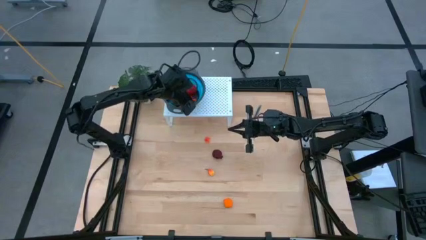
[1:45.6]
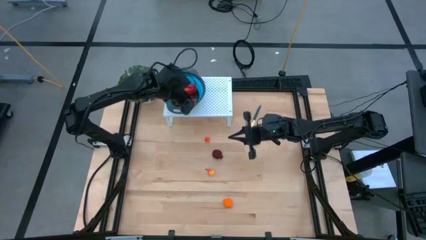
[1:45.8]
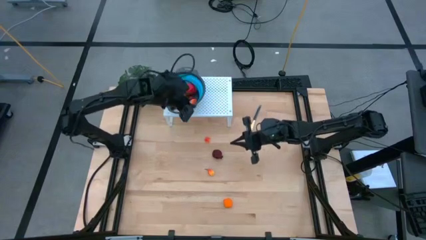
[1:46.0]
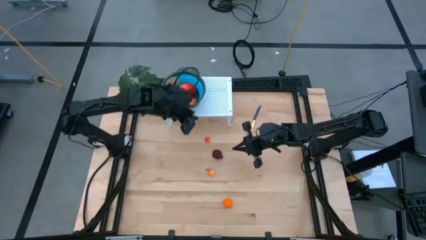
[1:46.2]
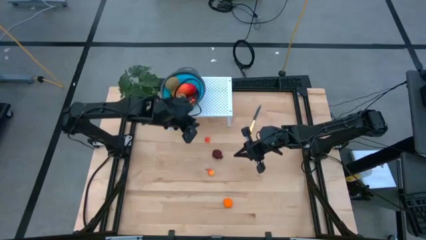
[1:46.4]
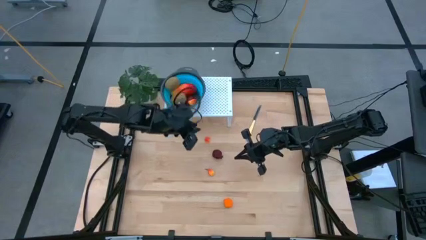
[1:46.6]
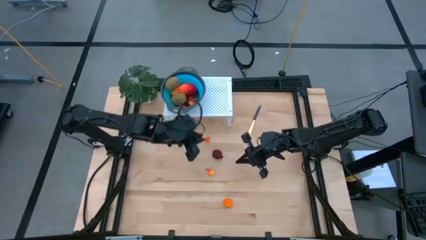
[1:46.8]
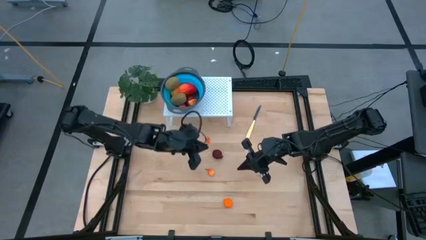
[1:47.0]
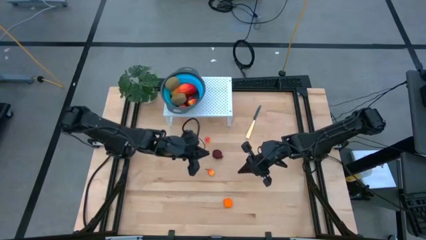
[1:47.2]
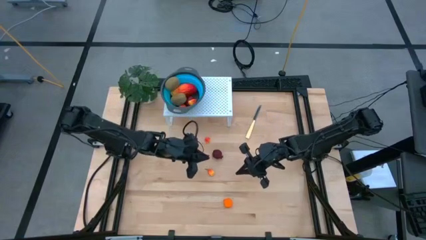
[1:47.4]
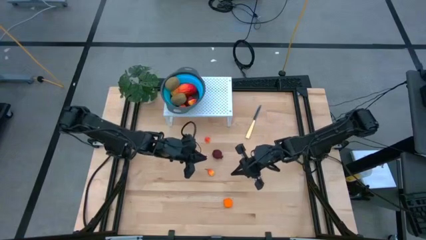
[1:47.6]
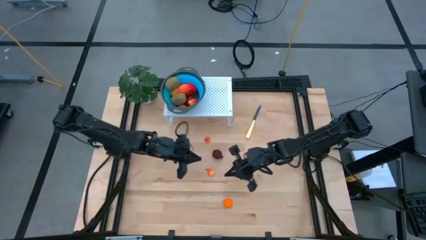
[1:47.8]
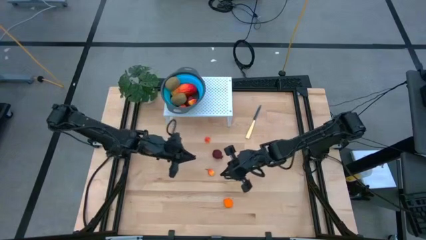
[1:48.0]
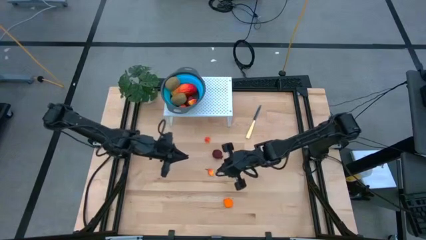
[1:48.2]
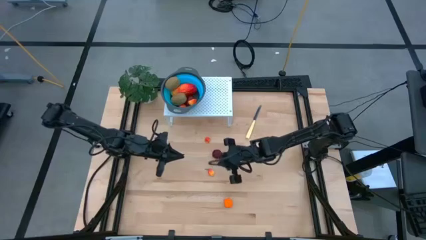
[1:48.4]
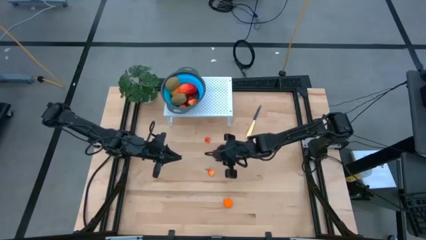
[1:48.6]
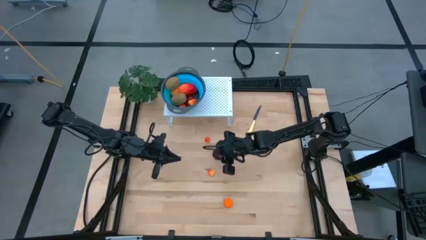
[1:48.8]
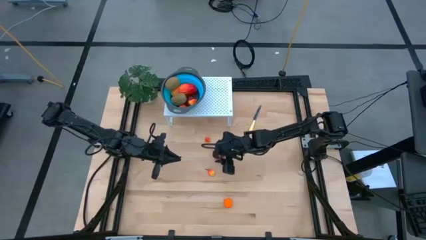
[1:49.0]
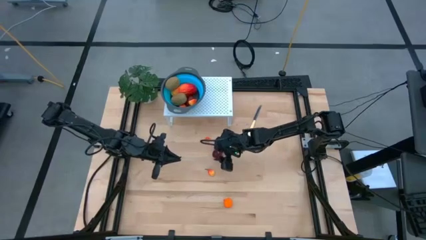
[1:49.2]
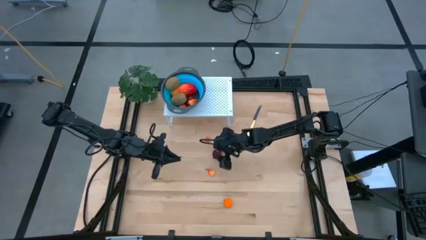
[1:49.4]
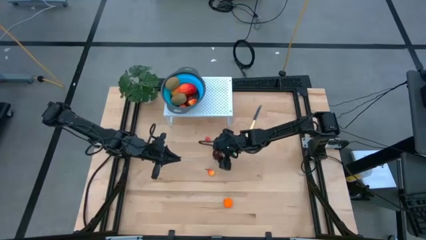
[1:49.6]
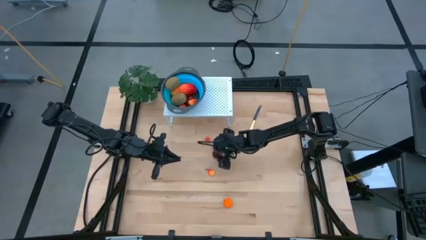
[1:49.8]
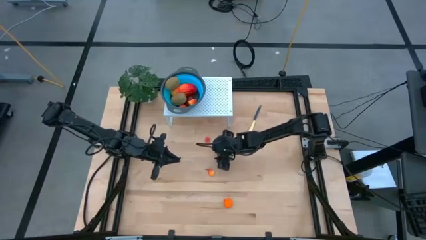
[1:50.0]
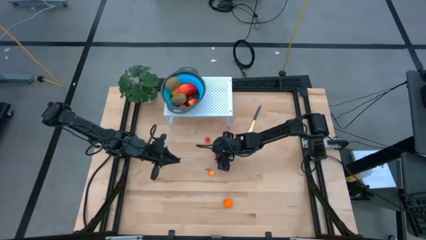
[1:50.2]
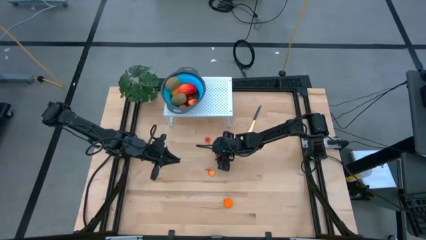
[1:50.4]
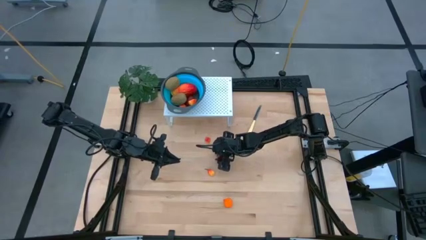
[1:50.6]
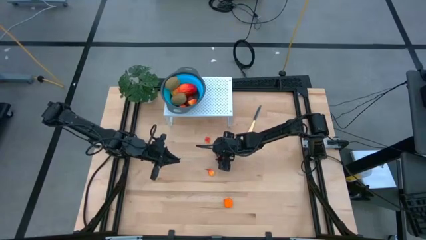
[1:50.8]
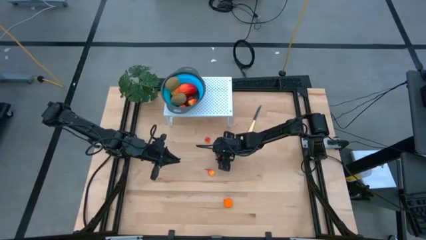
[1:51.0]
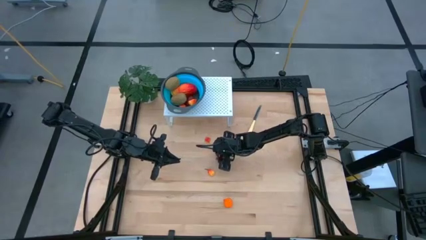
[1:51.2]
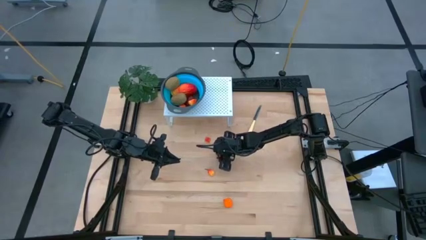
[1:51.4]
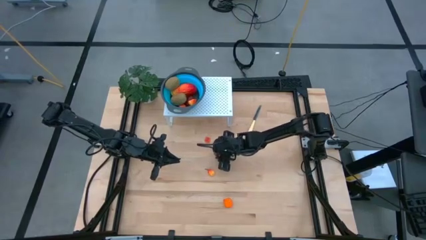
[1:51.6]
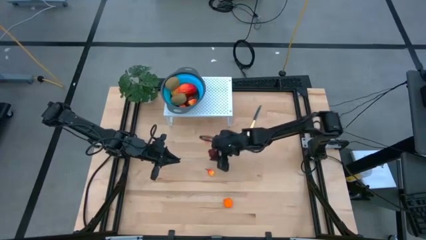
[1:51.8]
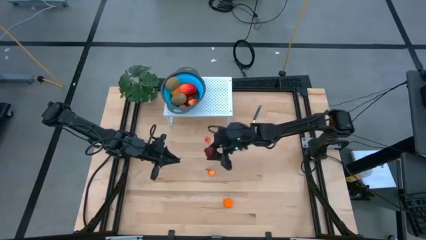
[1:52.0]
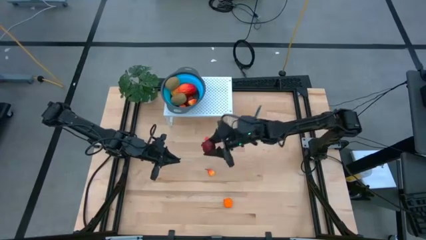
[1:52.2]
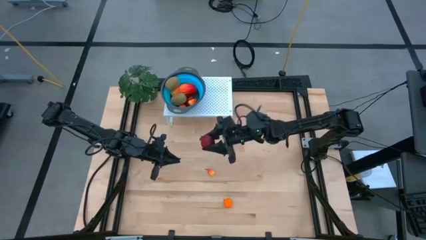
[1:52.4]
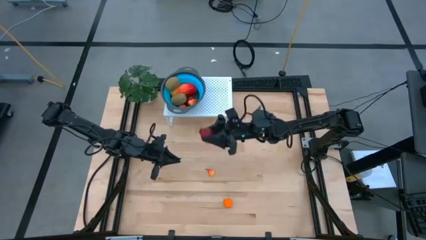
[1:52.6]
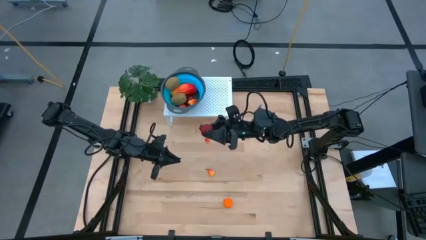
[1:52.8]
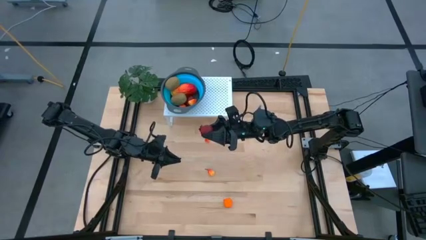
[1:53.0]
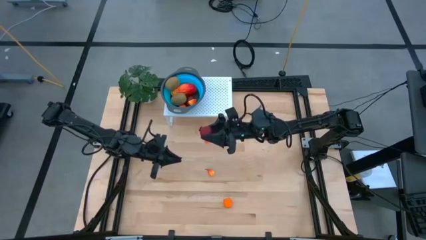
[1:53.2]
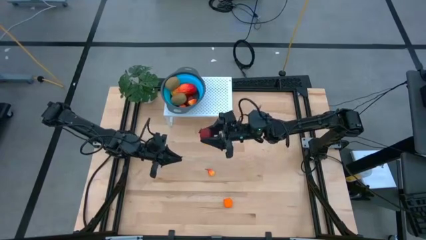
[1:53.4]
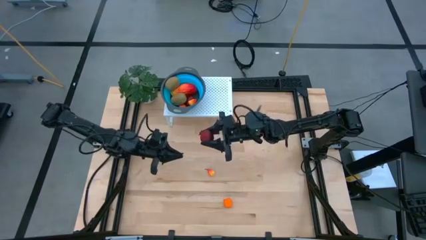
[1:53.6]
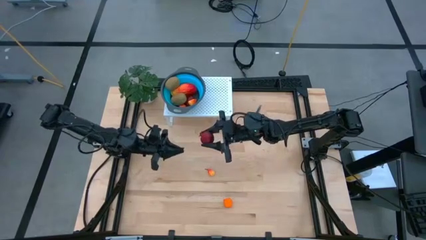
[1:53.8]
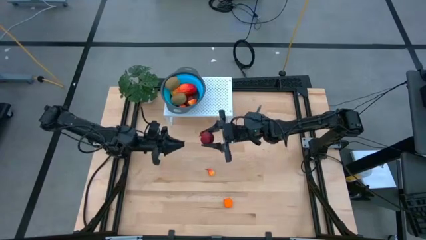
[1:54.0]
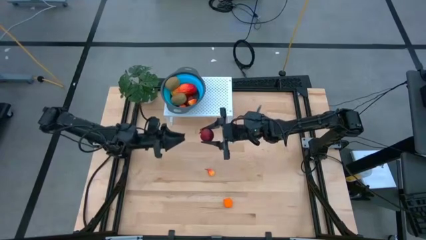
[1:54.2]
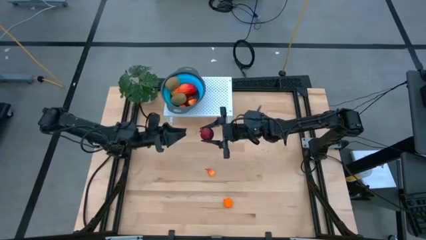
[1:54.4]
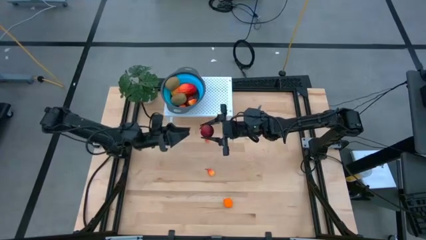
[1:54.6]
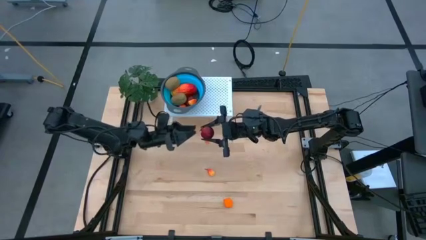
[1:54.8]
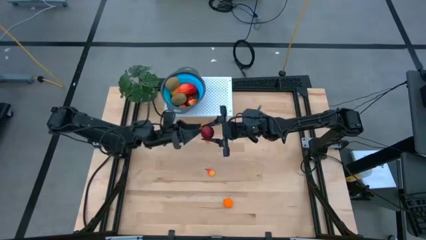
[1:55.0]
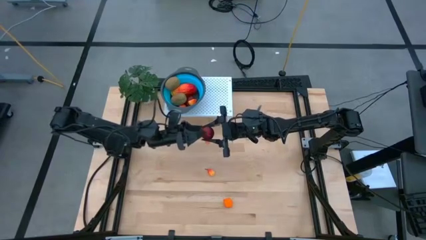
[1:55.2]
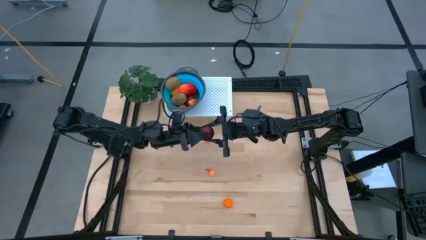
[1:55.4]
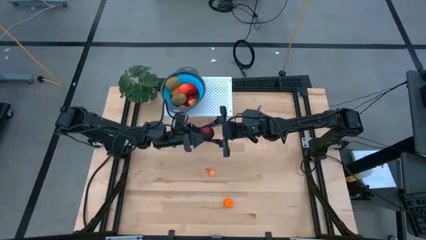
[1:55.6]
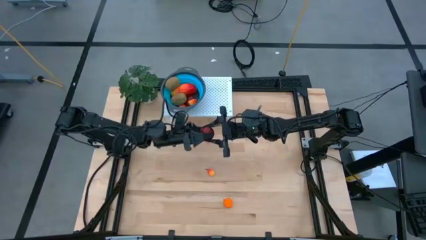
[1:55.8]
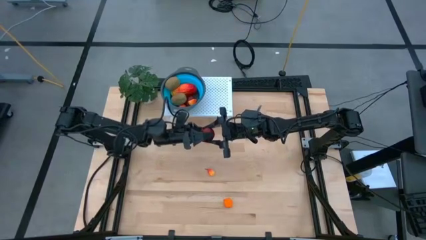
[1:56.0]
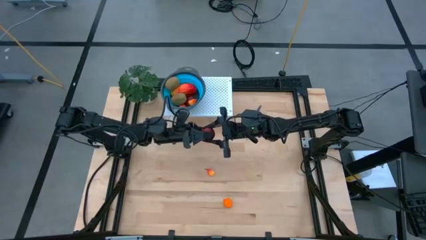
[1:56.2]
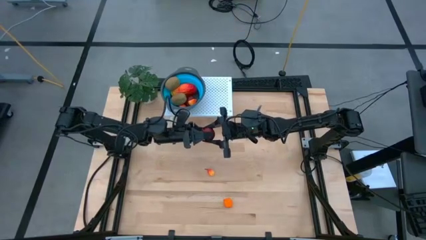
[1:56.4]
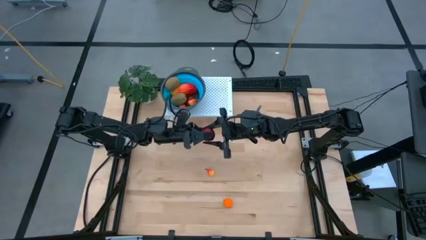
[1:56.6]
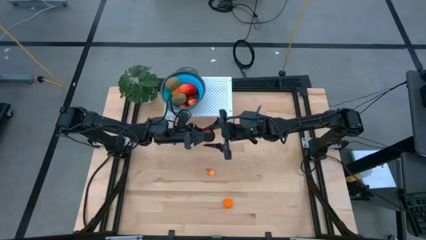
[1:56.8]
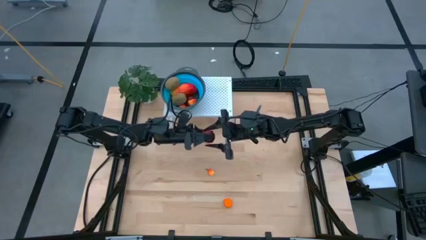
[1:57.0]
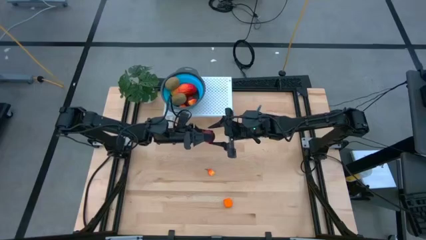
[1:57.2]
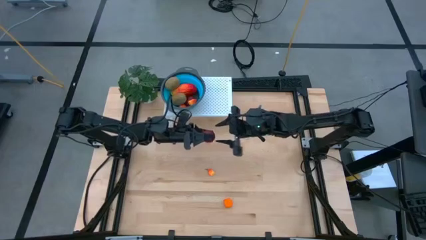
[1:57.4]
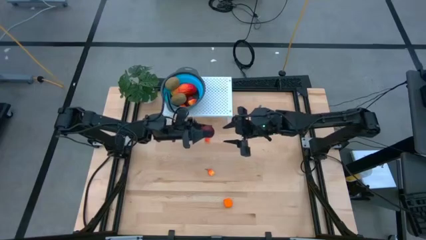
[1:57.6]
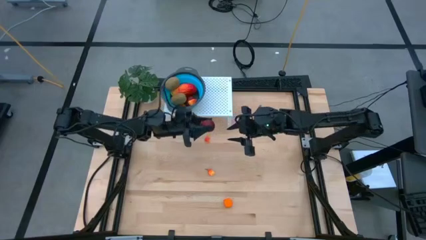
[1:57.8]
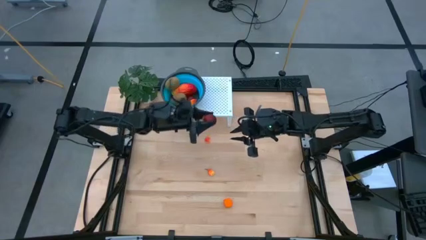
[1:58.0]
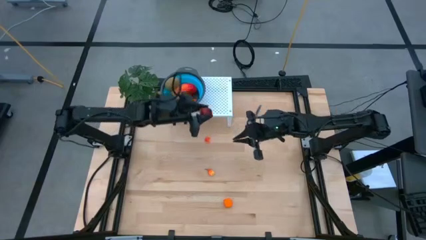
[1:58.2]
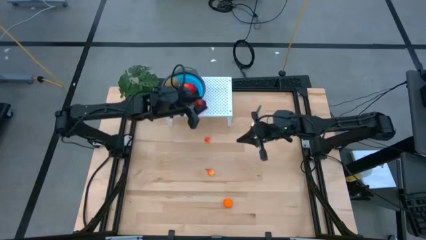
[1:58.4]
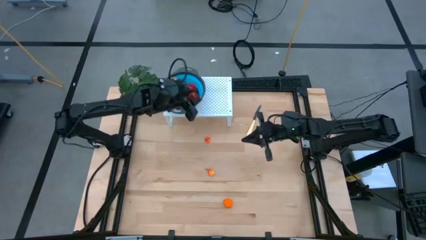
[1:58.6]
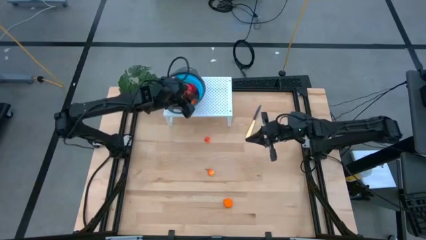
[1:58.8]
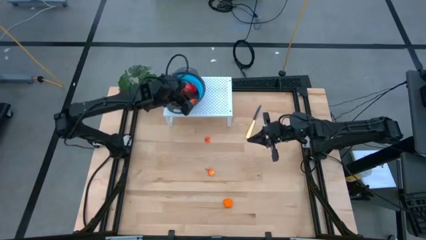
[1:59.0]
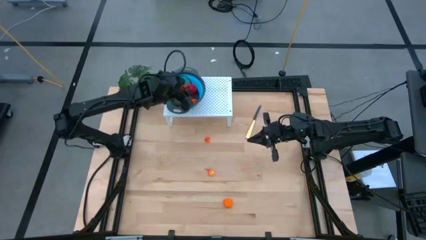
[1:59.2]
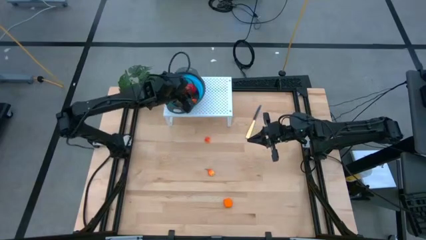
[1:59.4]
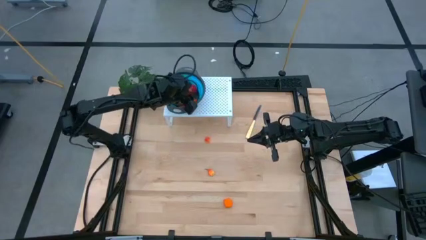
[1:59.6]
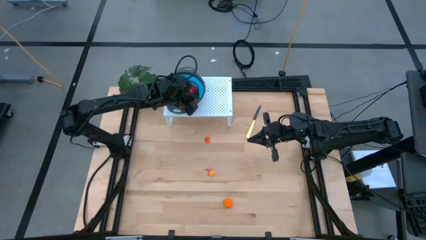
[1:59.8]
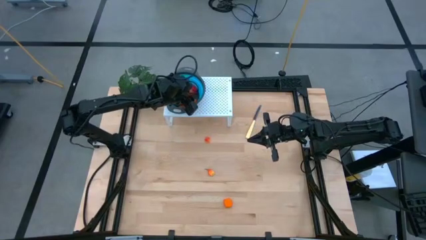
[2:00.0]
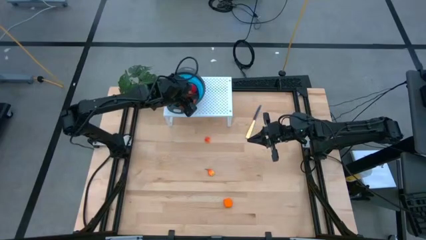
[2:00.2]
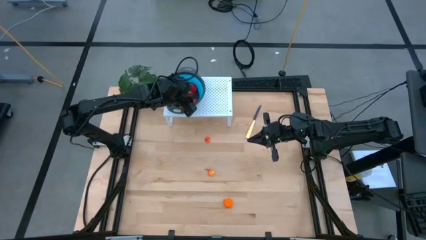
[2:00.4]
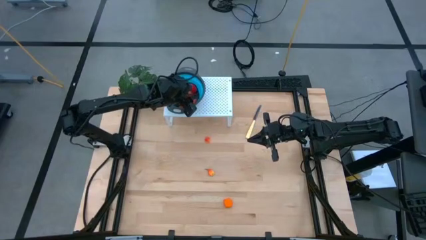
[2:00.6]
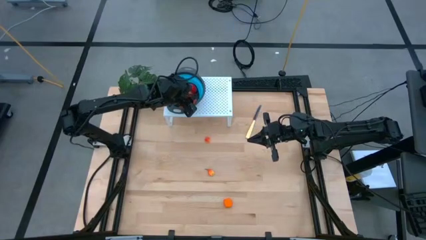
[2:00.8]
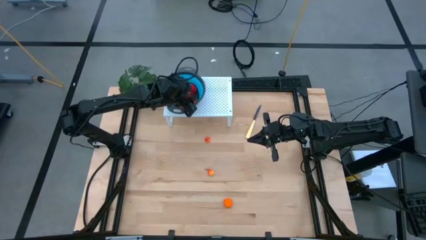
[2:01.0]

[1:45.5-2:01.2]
Task: Pick & Place Fruit
Put the pomegranate into the strainer bowl on the shelf

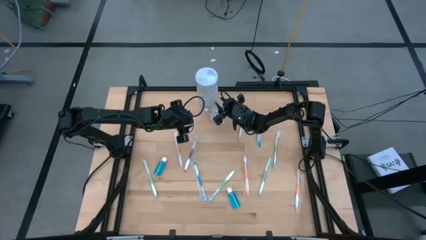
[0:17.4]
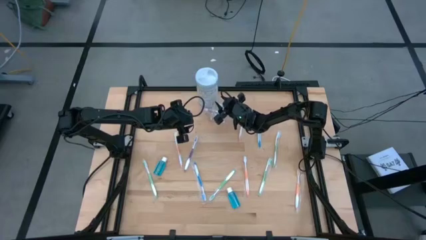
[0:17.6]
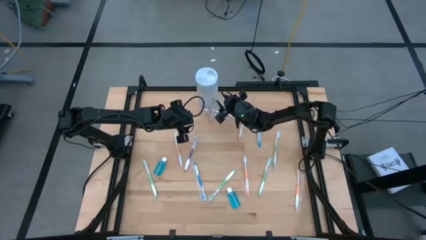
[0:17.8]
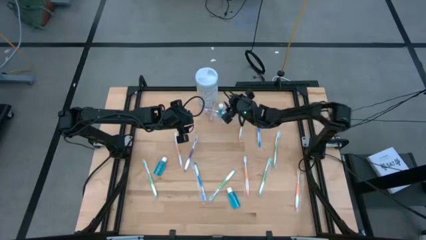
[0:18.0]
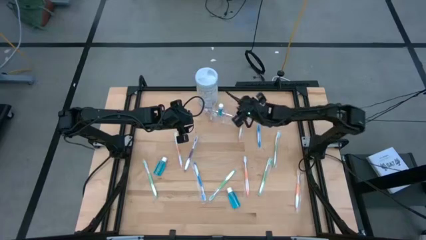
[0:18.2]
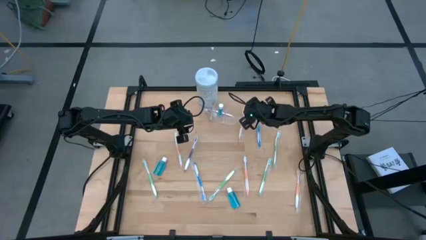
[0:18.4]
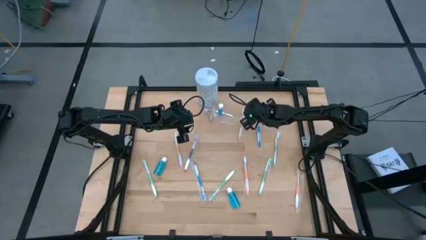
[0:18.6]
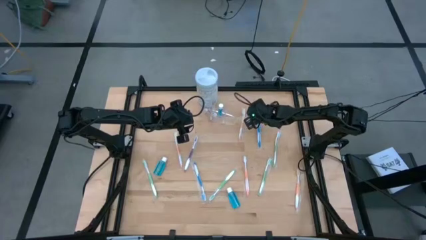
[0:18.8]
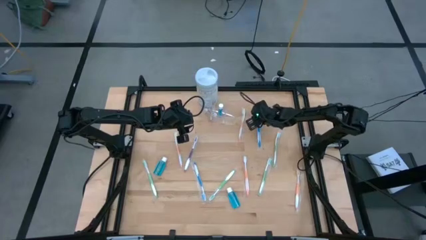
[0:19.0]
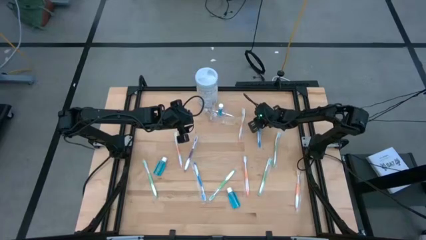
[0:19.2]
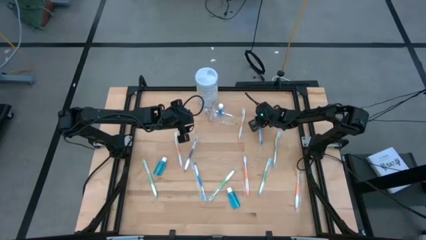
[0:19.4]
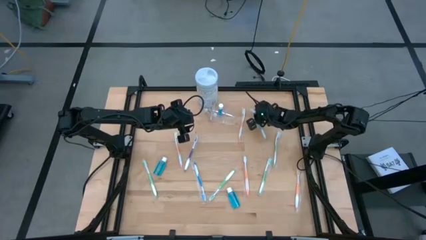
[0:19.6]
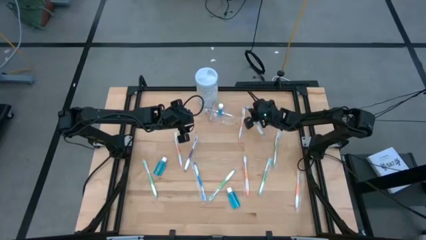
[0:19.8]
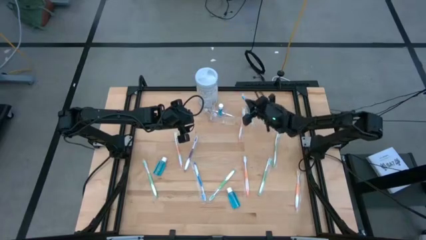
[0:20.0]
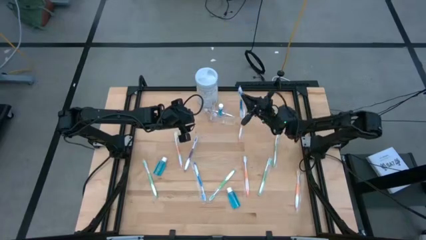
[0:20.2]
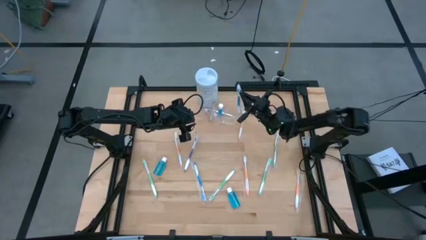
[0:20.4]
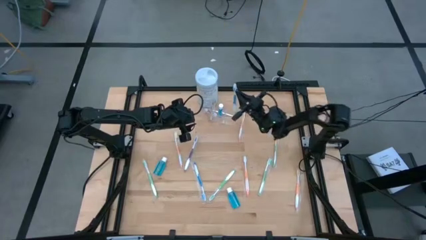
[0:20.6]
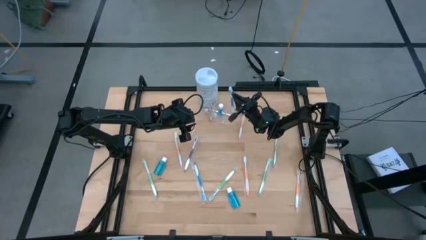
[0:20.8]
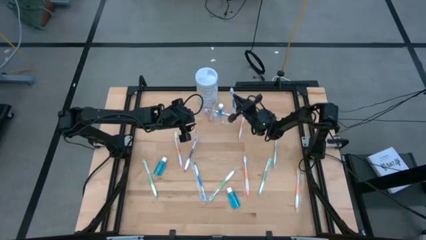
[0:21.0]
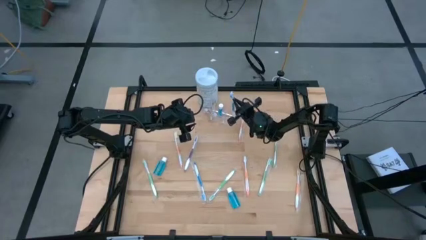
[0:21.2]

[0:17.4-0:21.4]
Task: Pick & Place toothbrushing station
Put the blue toothbrush into the transparent organizer
